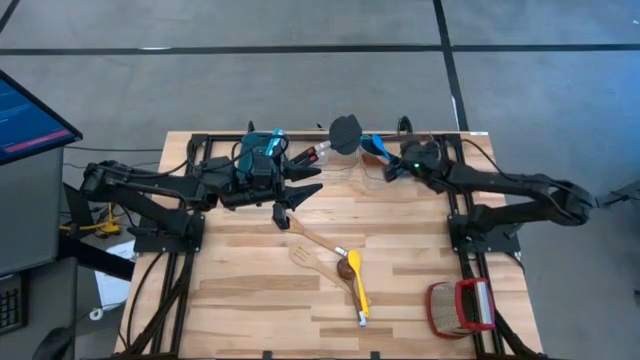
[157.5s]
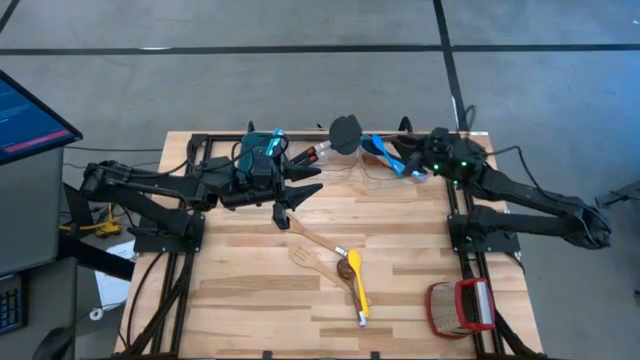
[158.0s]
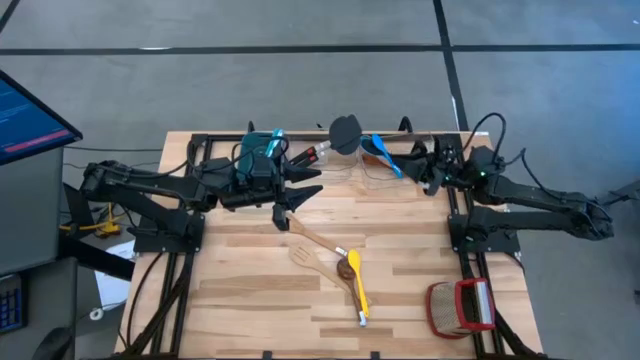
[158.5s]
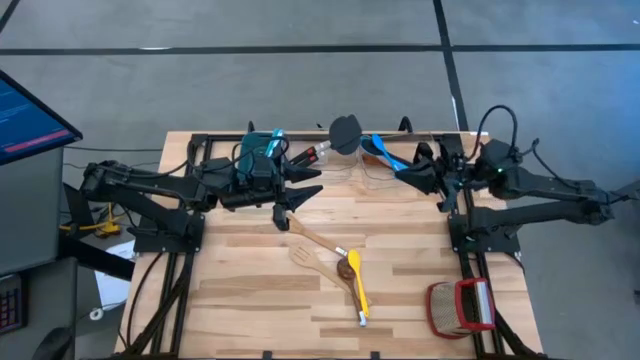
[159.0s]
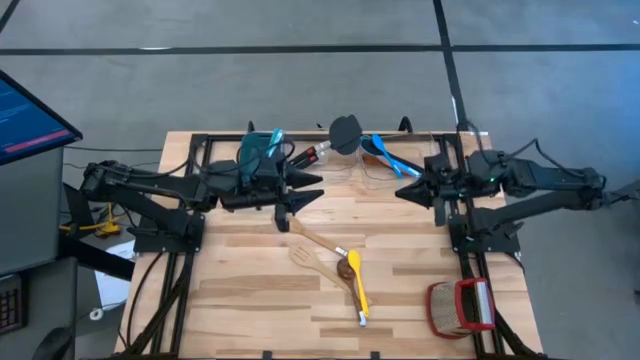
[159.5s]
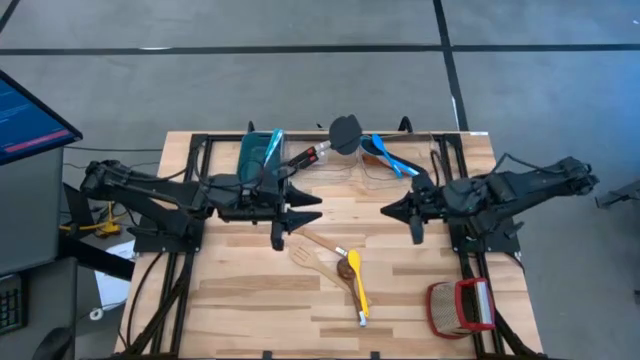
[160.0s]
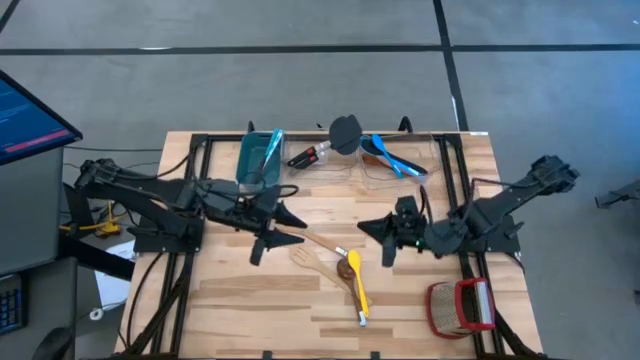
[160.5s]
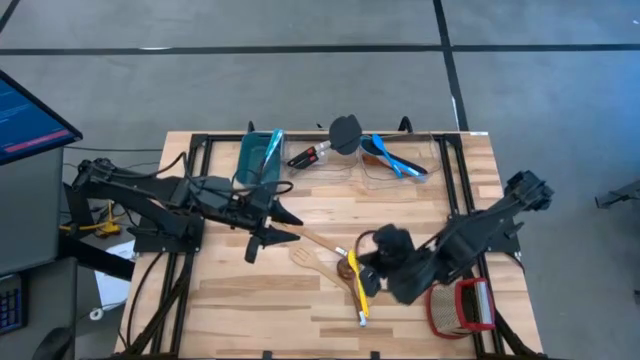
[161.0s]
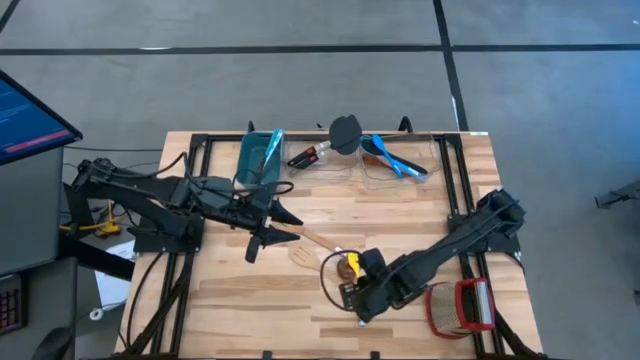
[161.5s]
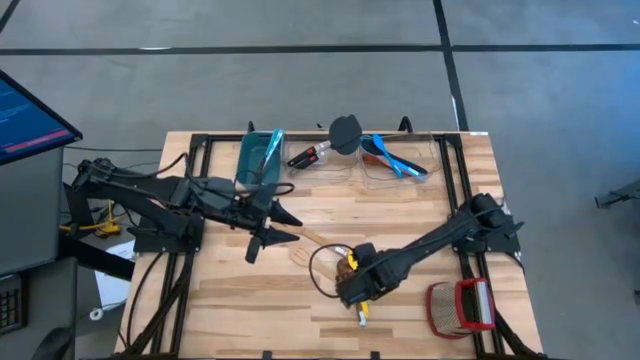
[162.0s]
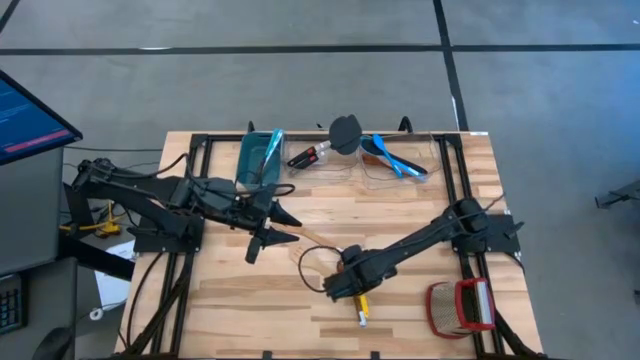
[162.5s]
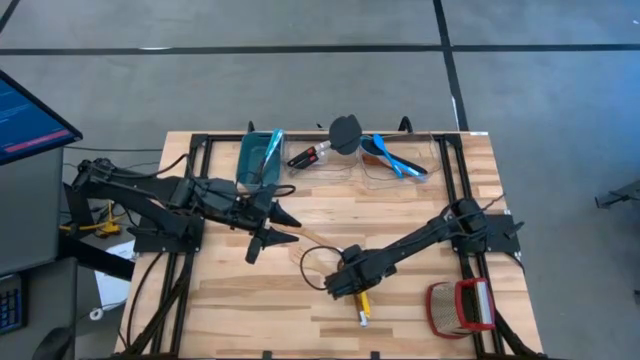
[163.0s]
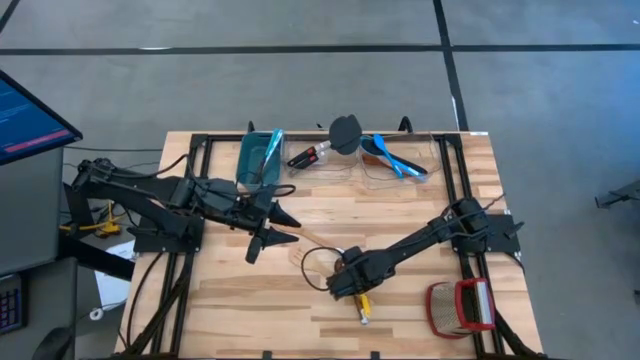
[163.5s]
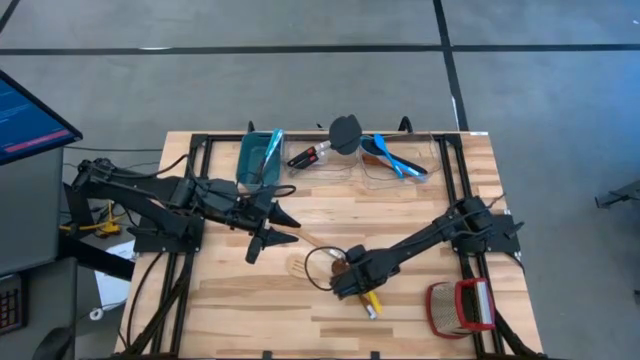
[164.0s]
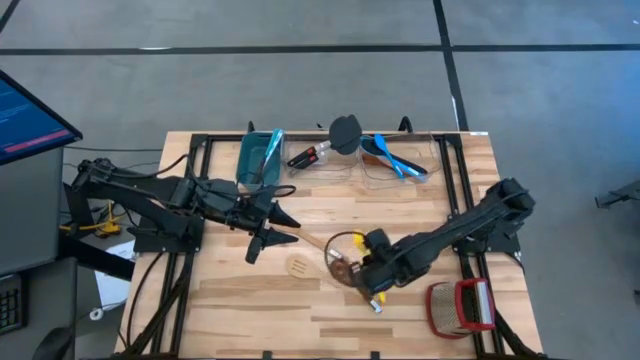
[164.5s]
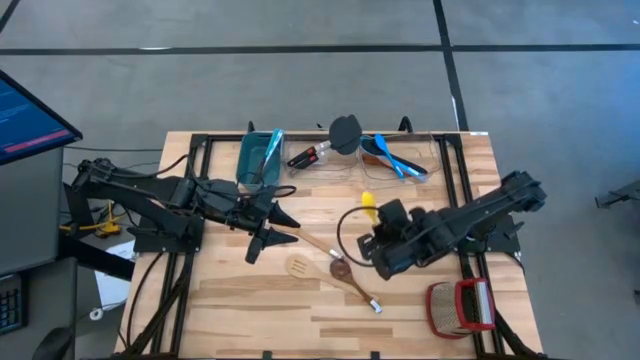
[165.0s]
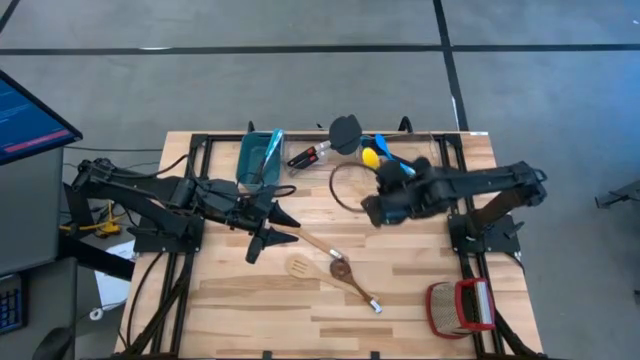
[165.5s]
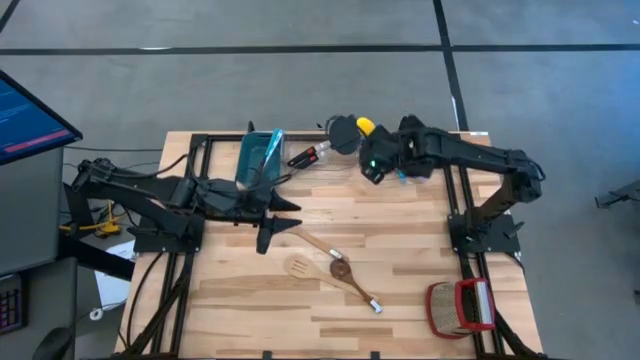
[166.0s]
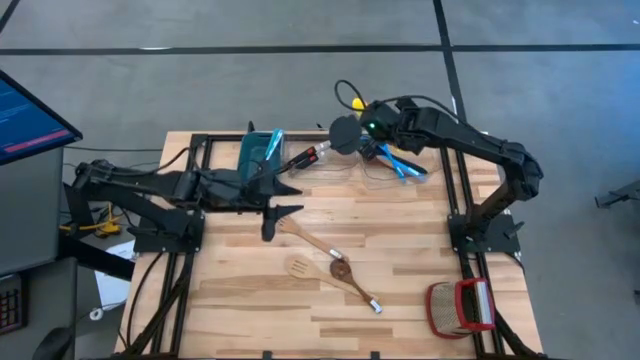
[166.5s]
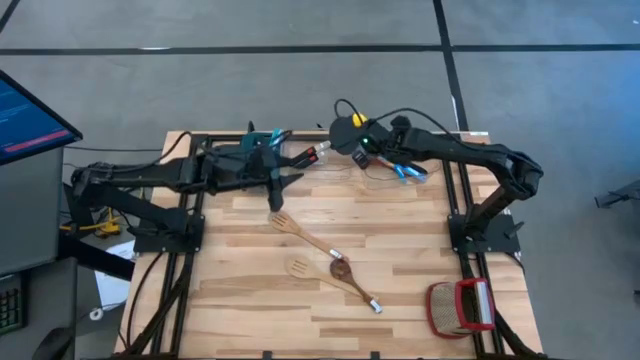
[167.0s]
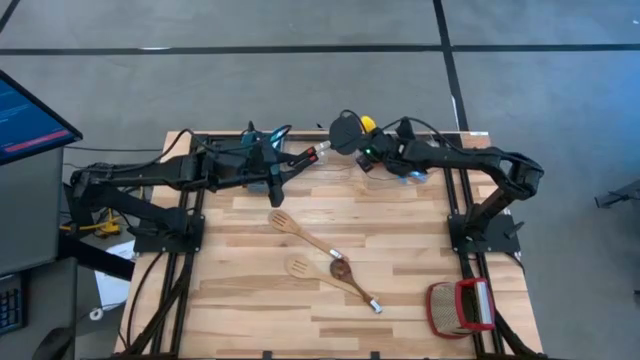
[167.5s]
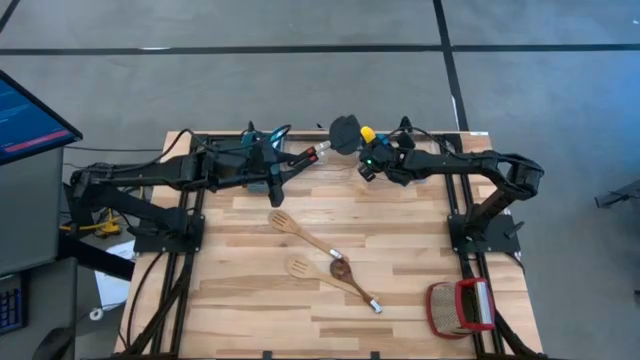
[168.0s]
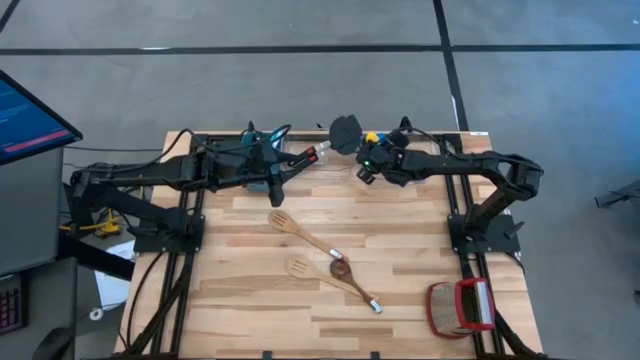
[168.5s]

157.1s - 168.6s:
Task: Pick & Place Kitchen Items
Put the yellow serving spoon into the right transparent bin

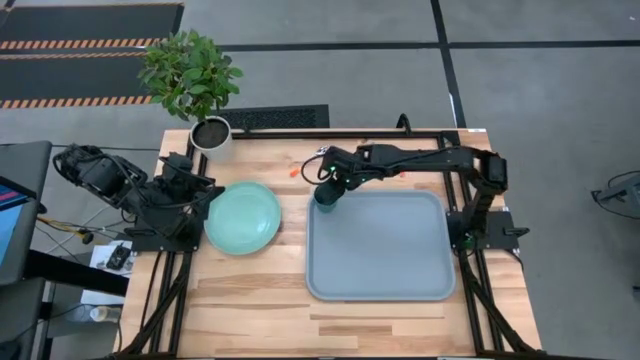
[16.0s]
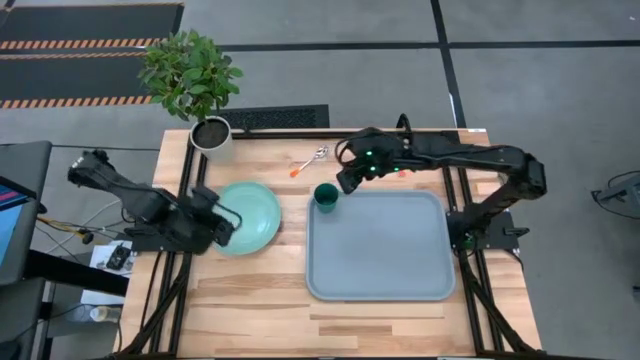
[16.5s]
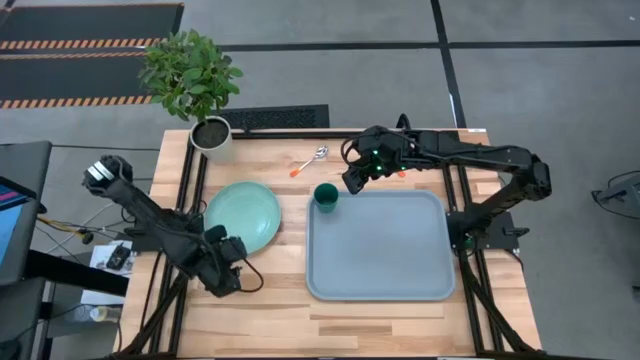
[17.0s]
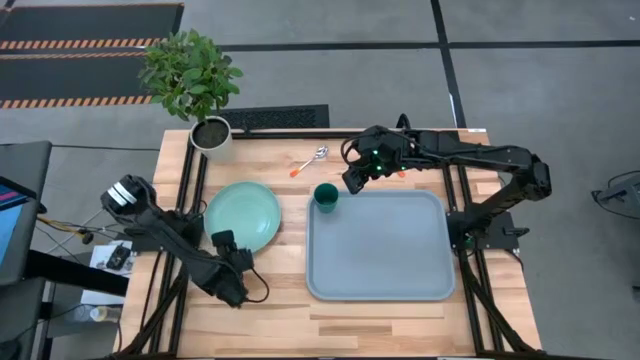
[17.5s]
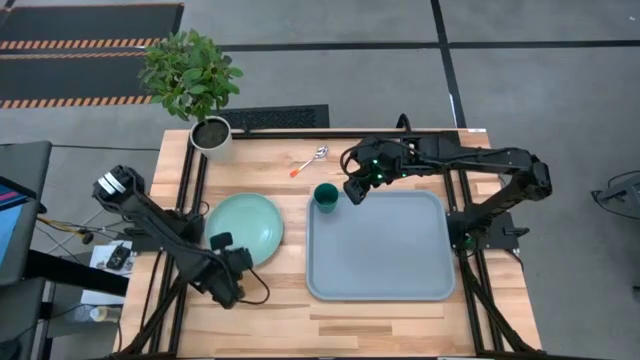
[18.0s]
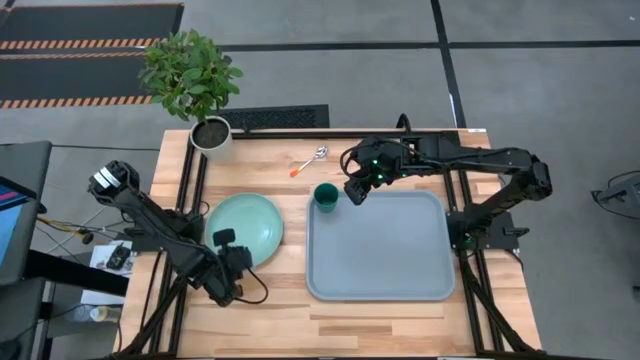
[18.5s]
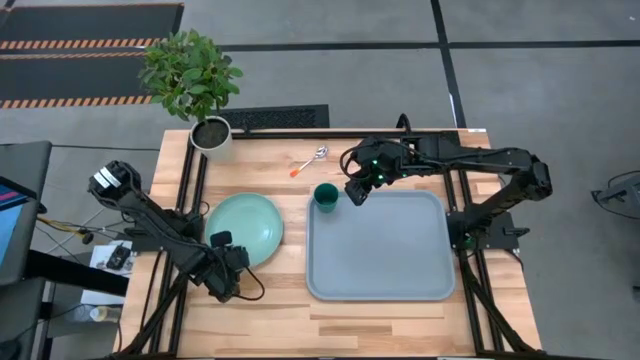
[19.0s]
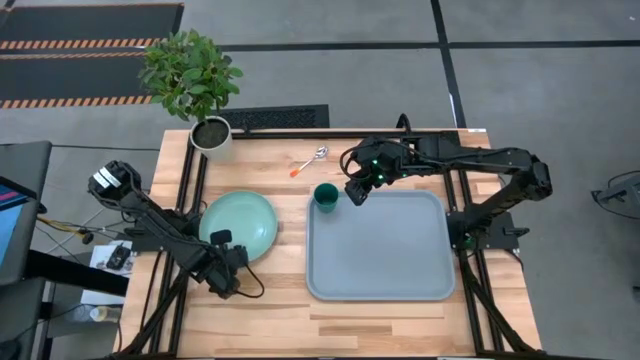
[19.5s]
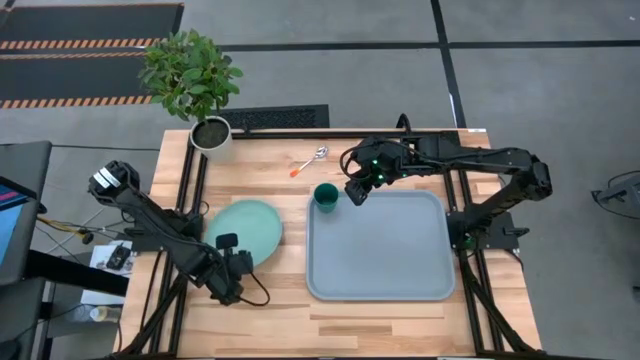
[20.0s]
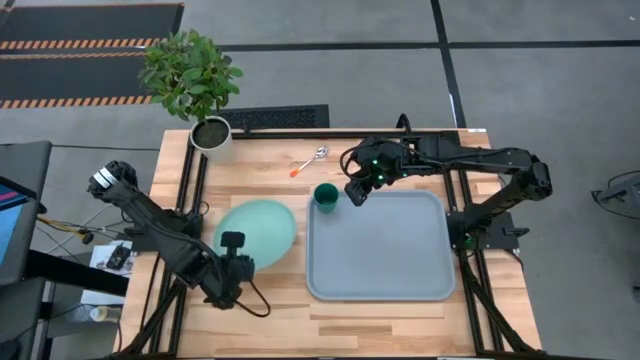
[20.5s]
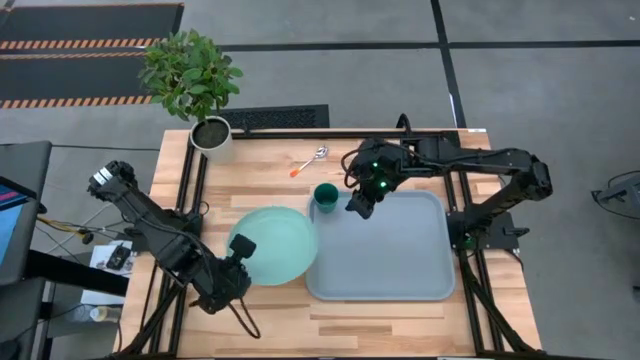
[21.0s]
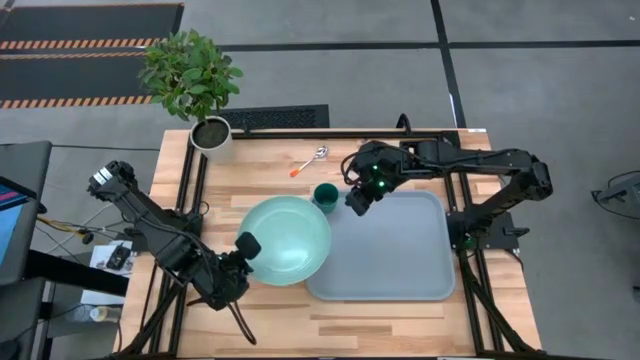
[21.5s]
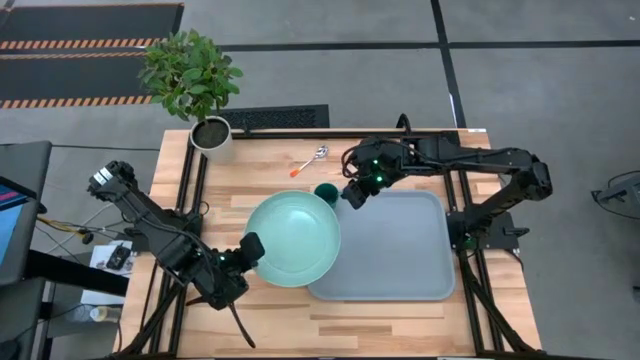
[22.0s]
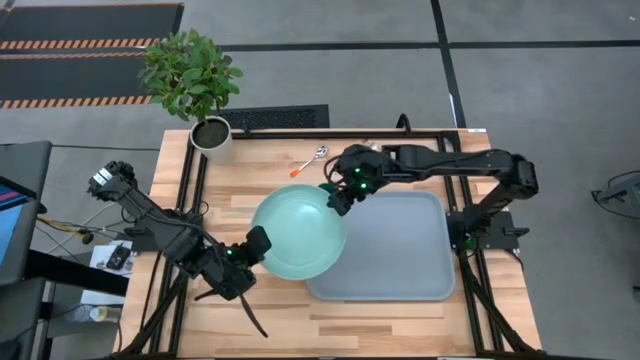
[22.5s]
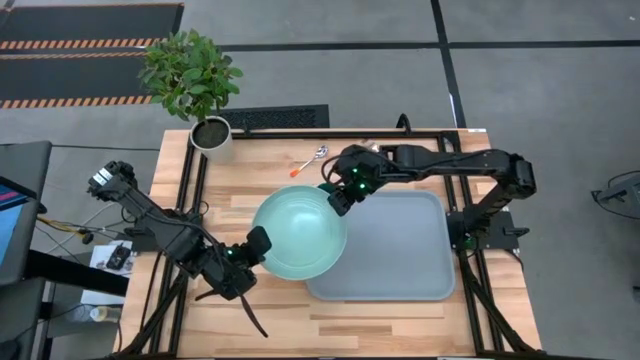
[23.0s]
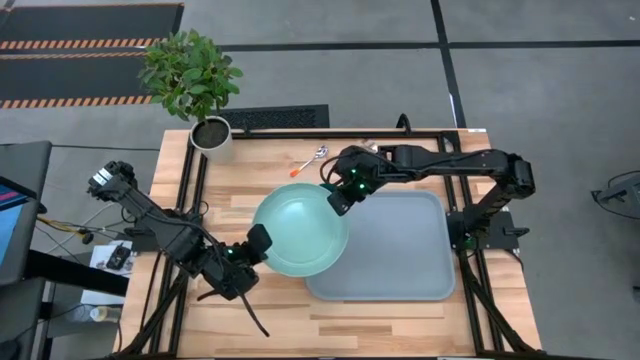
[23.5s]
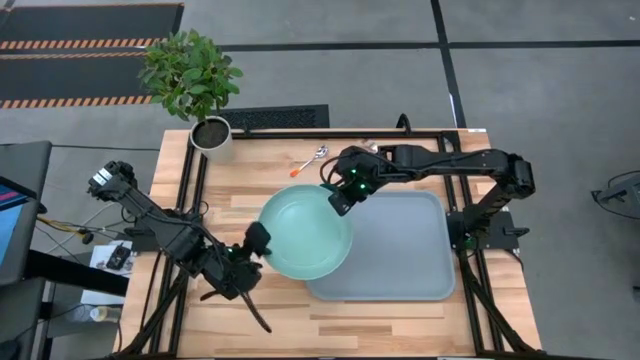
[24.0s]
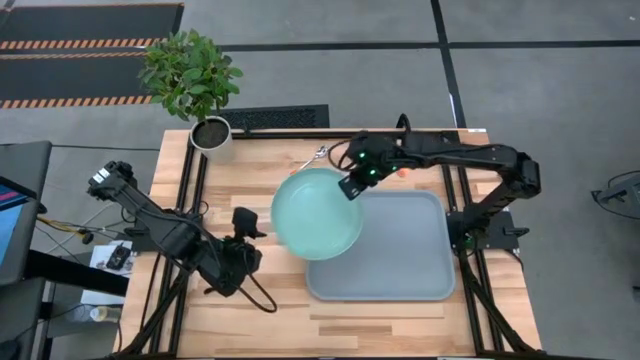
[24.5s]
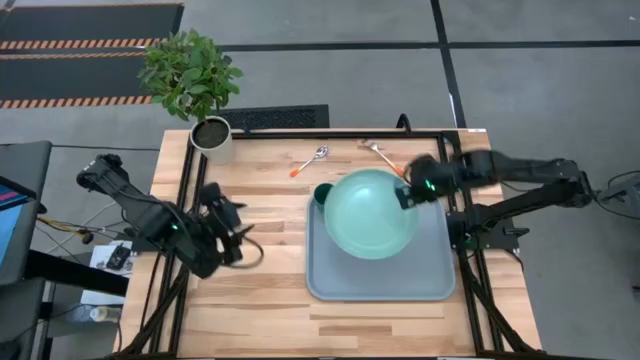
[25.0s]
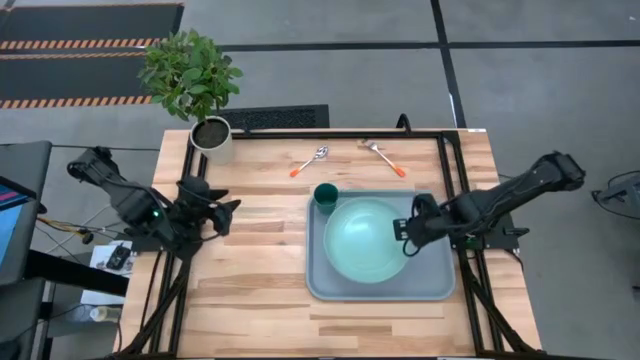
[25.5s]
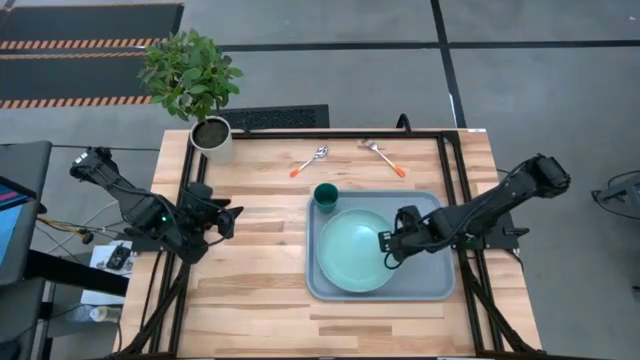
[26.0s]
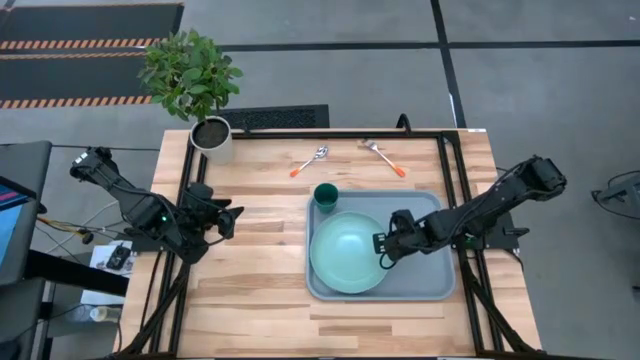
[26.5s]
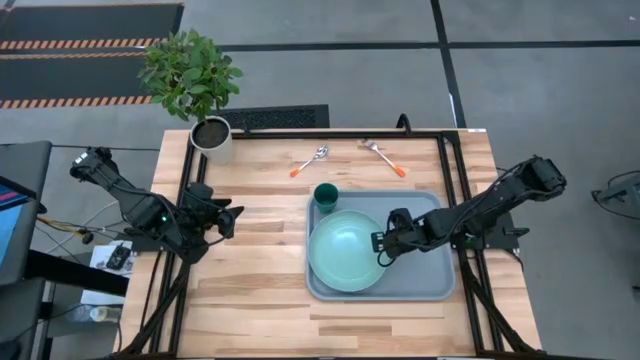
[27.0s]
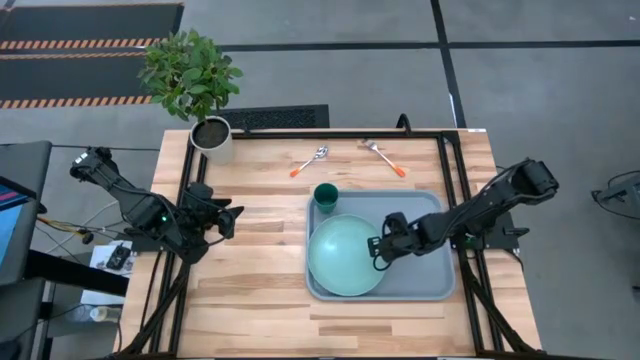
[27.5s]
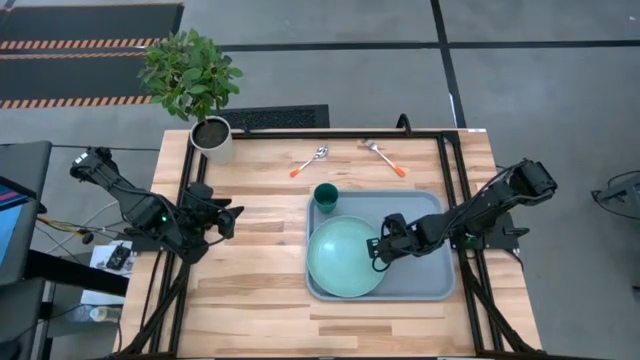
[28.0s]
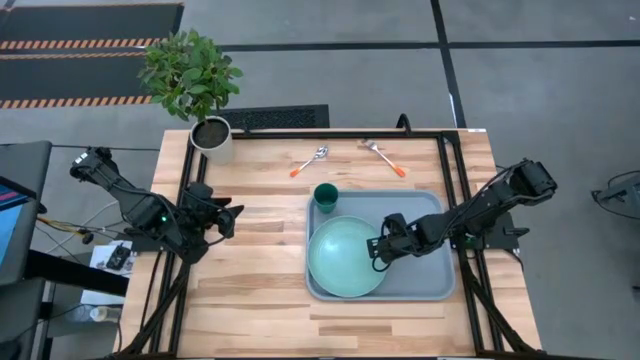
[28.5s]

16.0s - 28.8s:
Task: Pick and place plate/cup/fork/spoon on tray
Put the green plate on the blue tray at the bottom of the green plate
